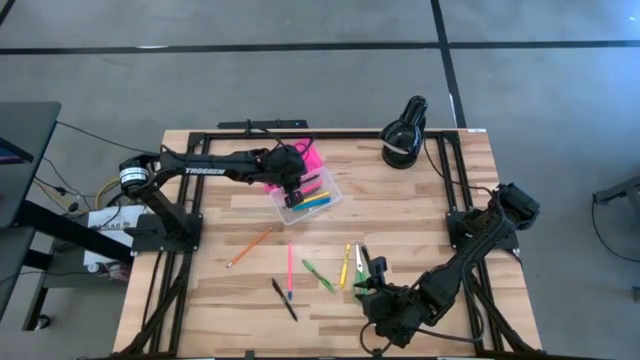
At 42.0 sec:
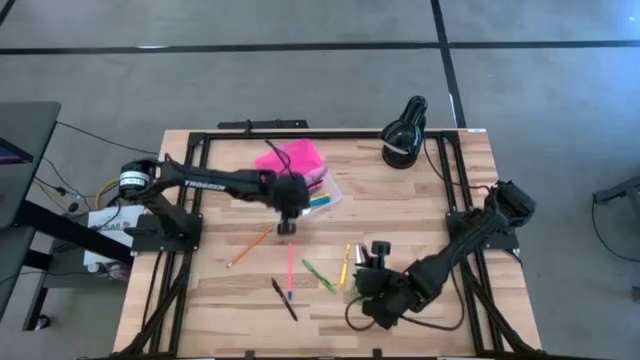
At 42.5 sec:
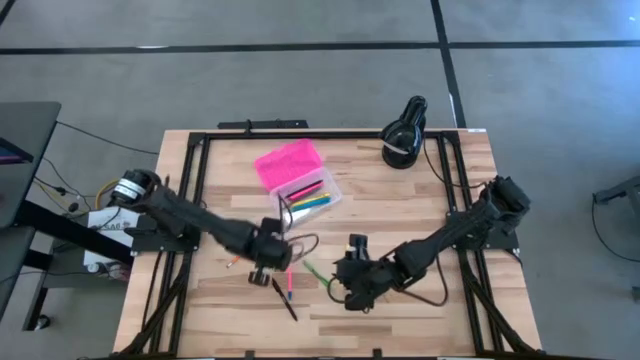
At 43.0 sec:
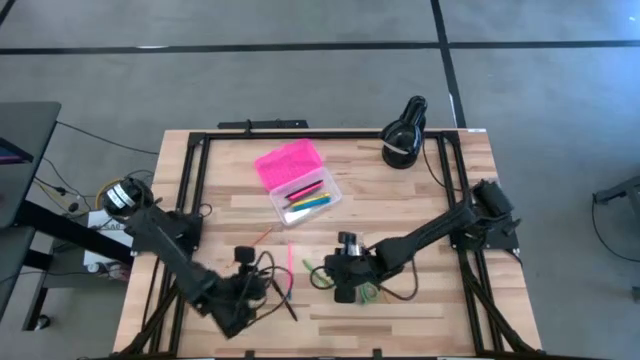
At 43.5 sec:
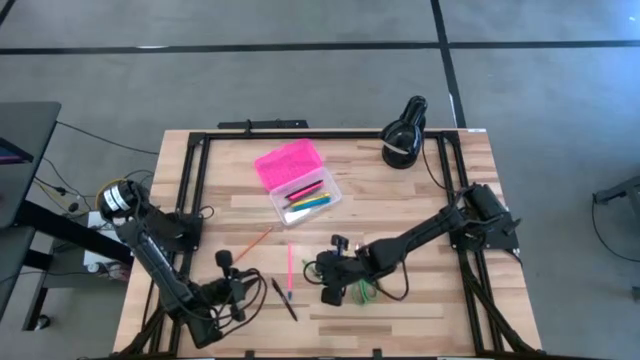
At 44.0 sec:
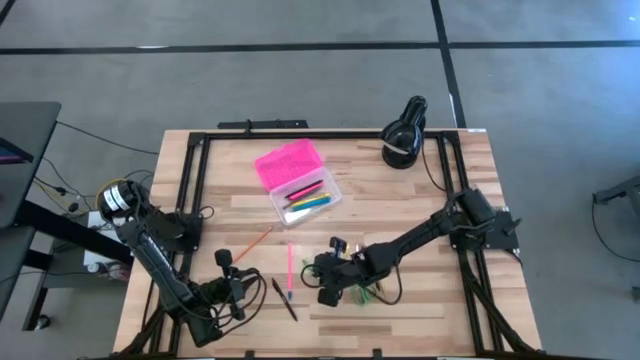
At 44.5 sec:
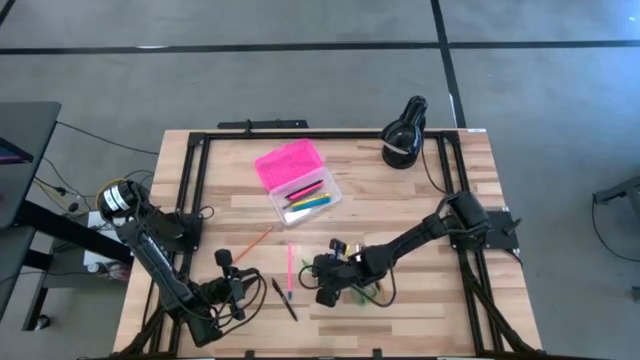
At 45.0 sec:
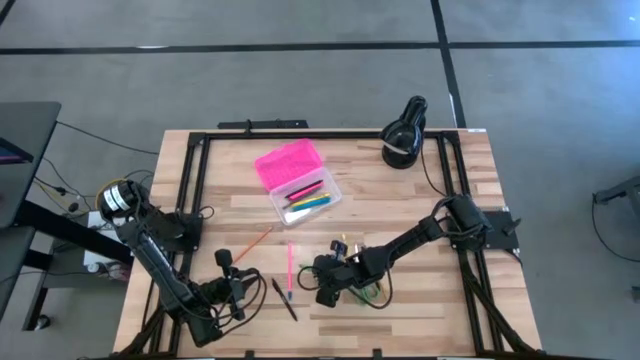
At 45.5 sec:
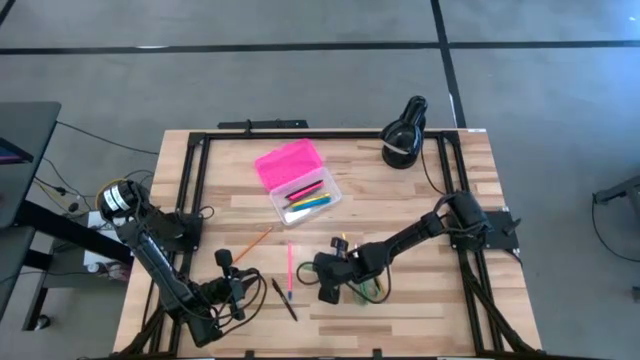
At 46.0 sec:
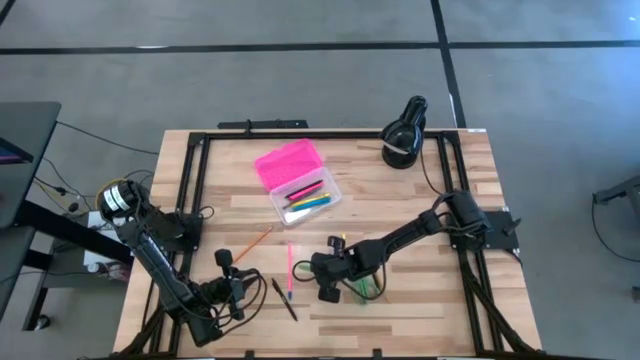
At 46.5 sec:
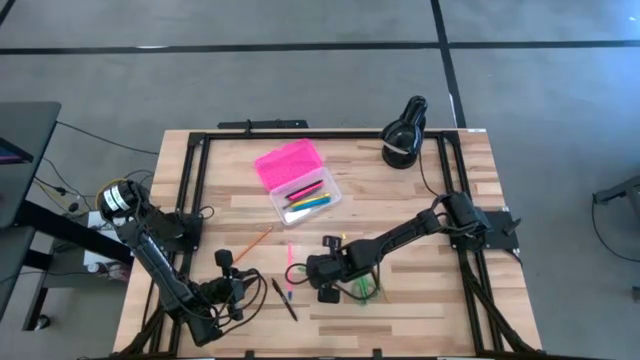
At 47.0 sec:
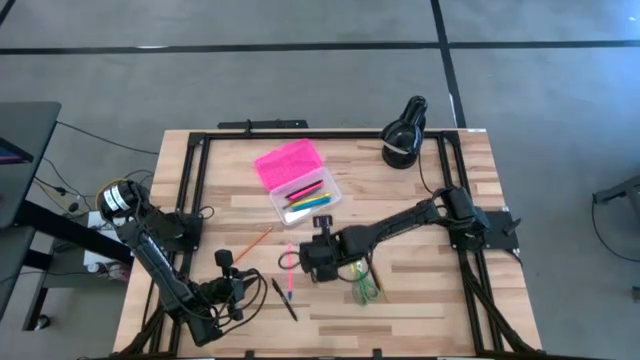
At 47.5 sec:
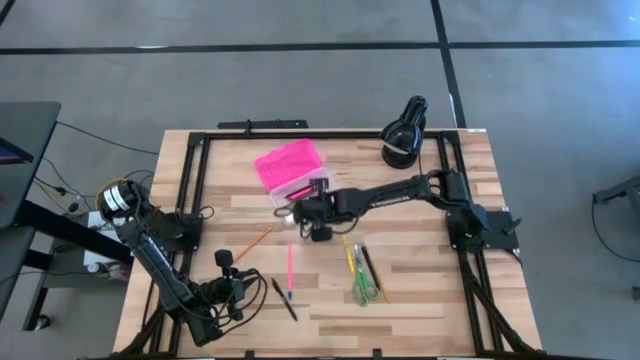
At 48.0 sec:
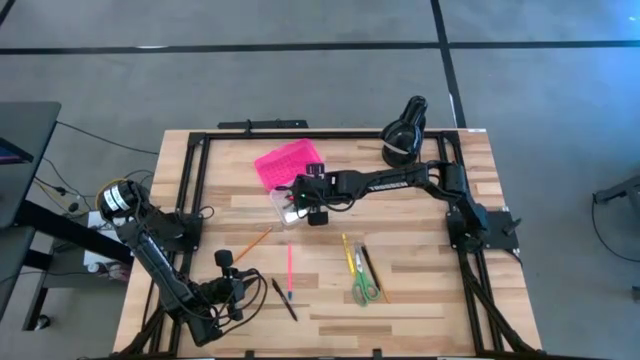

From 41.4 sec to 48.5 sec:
Task: Pick & place school supplies into a supply box
Put the green pen into the black supply box

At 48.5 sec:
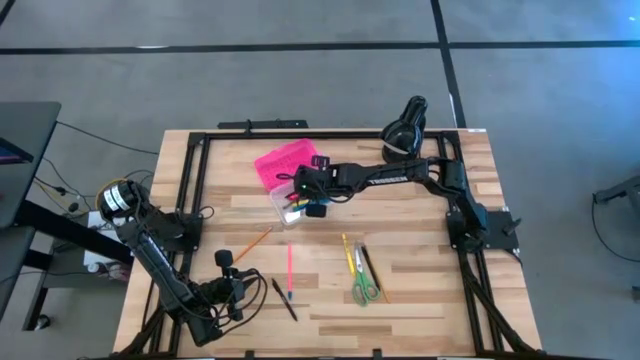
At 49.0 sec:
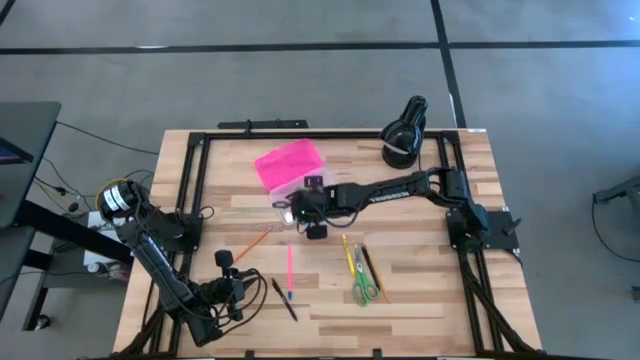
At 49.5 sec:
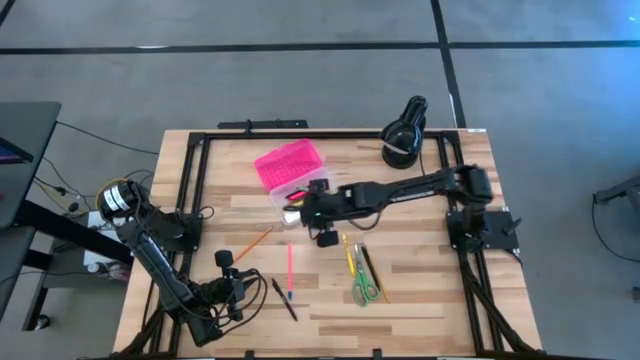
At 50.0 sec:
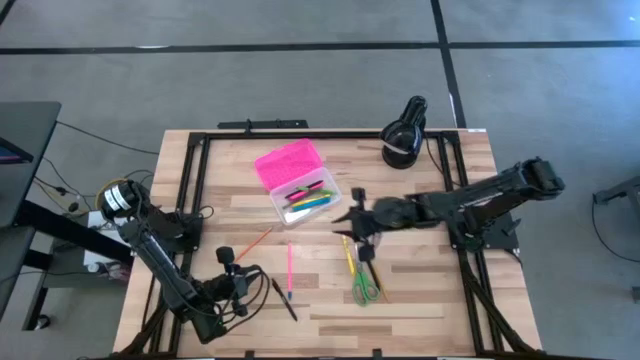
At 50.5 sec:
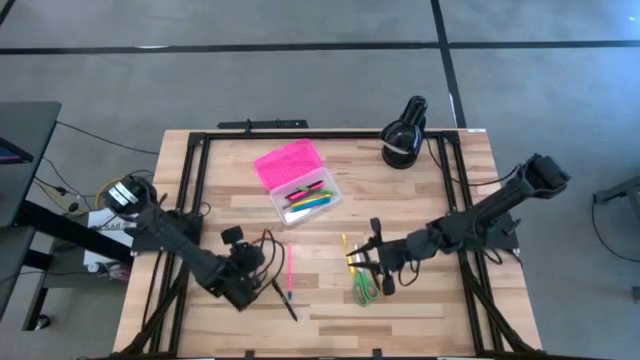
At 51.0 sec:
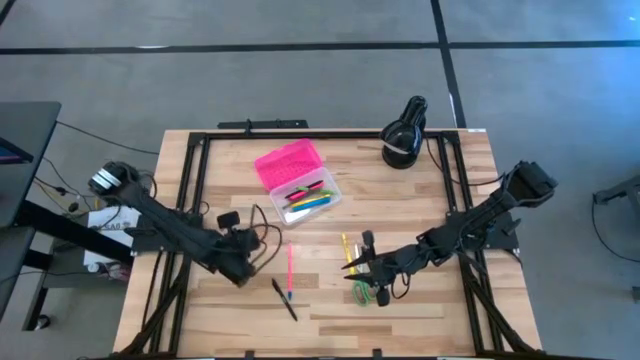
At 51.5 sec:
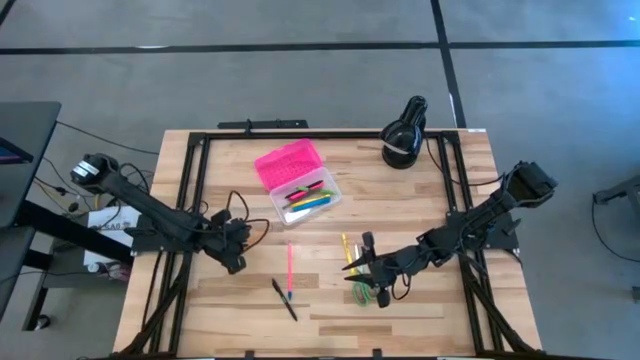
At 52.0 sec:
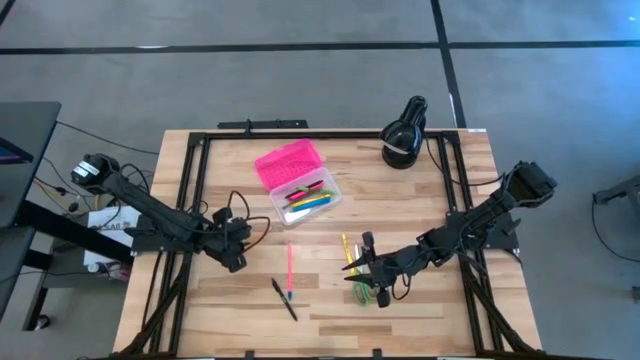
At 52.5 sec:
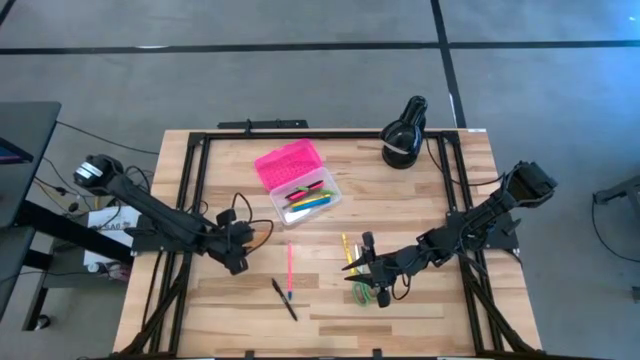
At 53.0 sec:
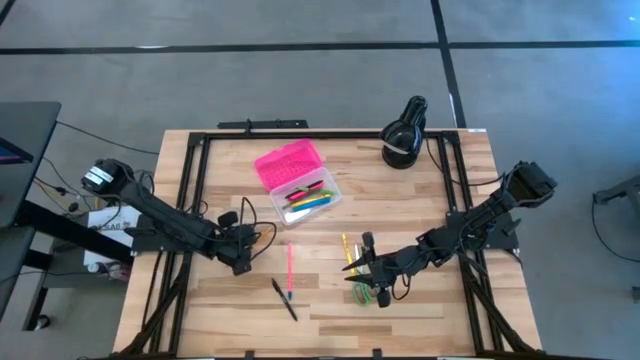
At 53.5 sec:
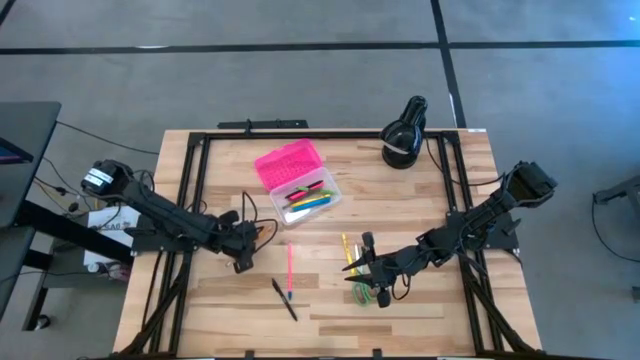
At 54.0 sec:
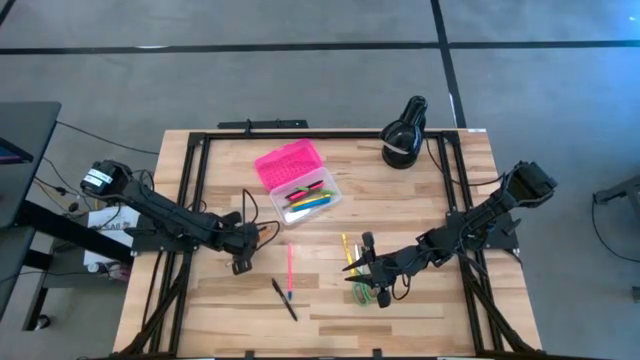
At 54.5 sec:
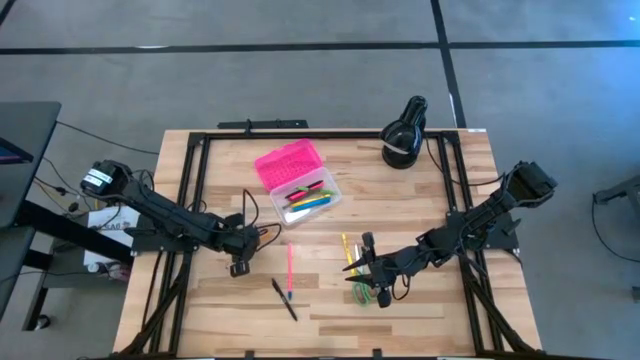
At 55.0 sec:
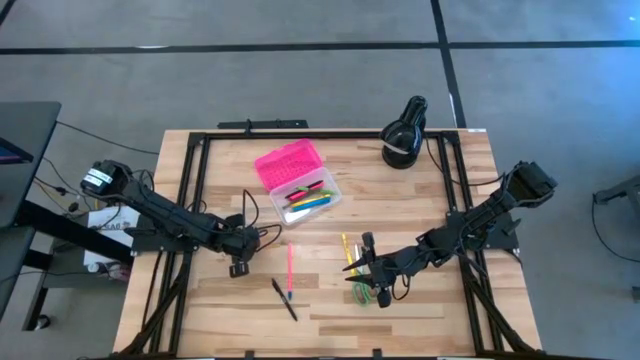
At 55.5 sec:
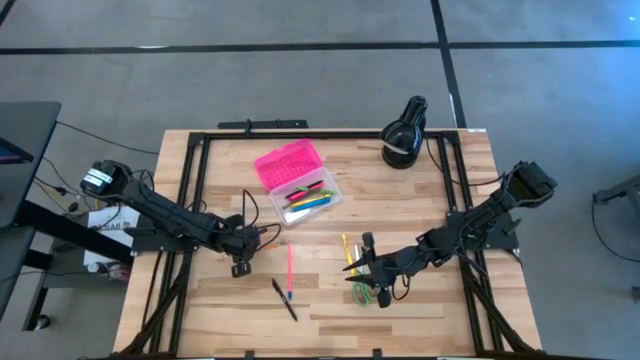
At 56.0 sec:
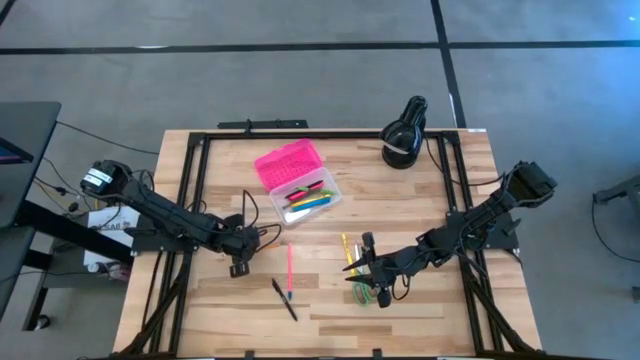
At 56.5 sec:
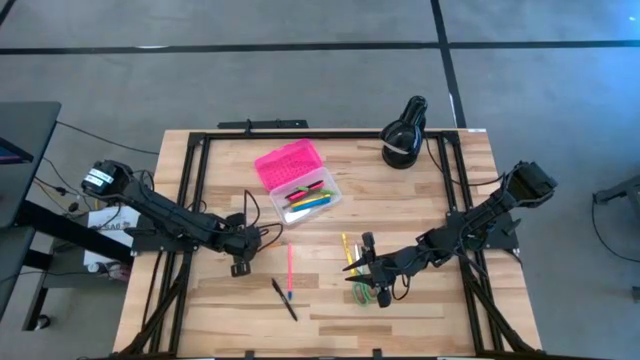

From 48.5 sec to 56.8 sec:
Put the orange pencil into the black supply box

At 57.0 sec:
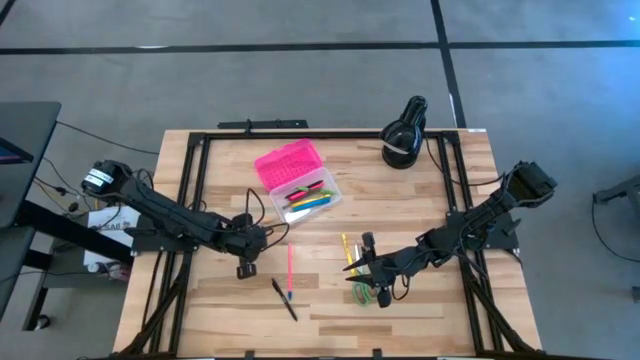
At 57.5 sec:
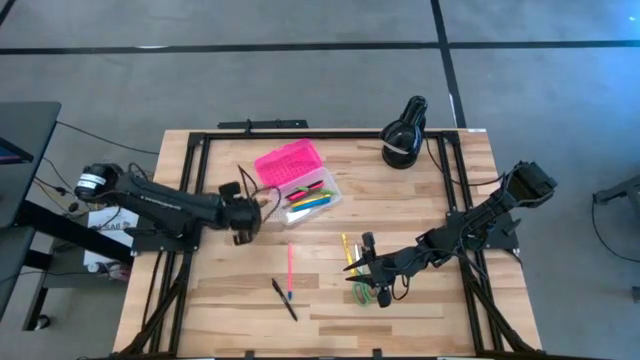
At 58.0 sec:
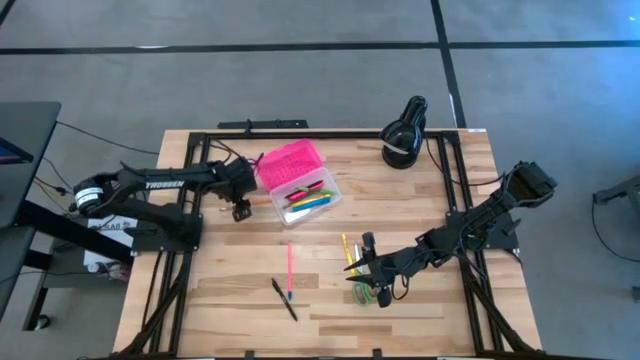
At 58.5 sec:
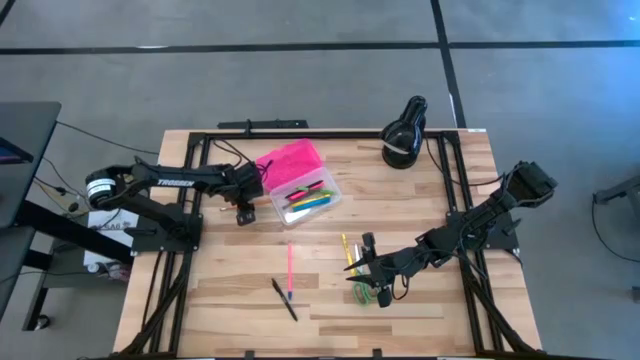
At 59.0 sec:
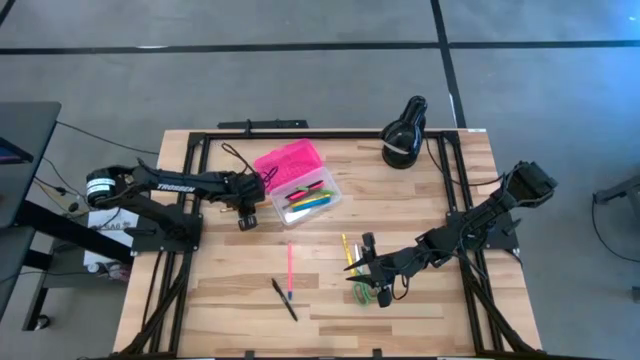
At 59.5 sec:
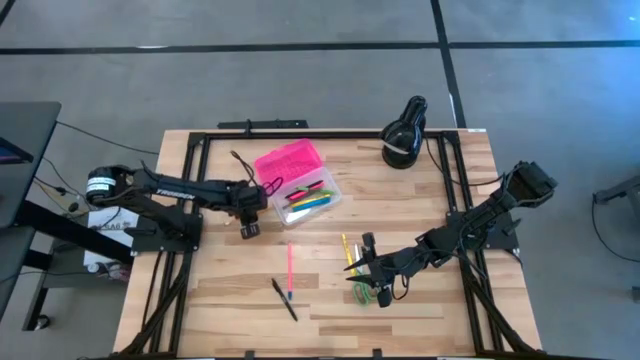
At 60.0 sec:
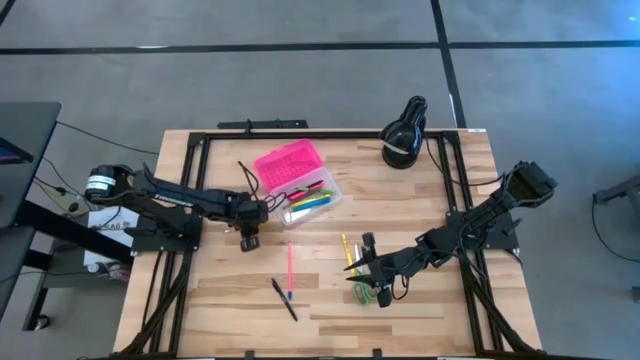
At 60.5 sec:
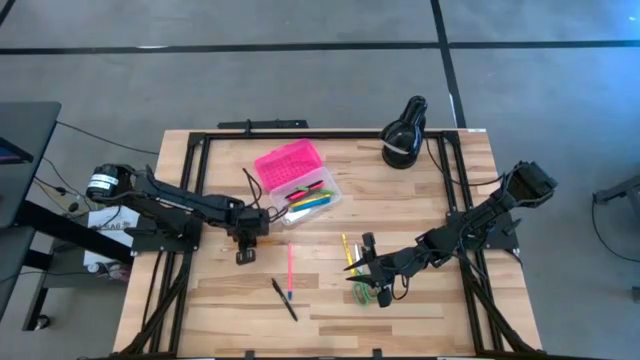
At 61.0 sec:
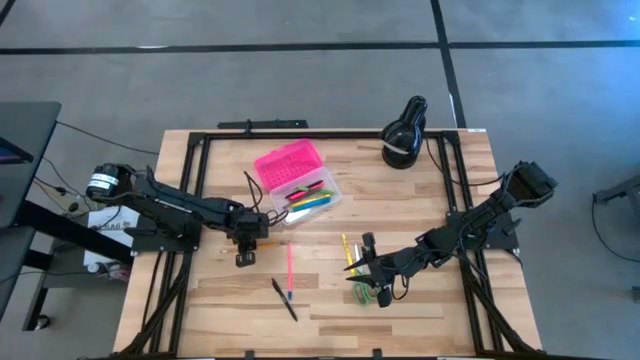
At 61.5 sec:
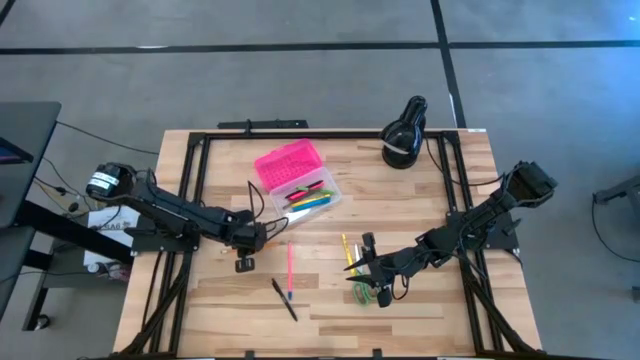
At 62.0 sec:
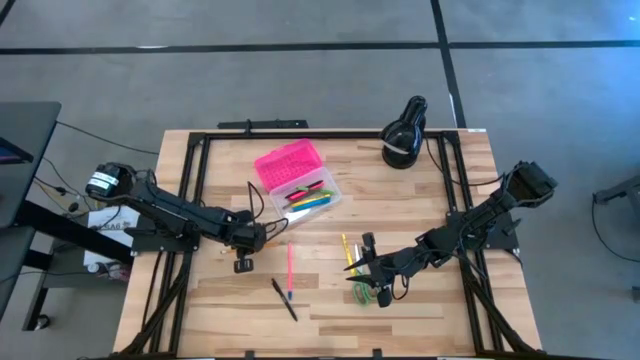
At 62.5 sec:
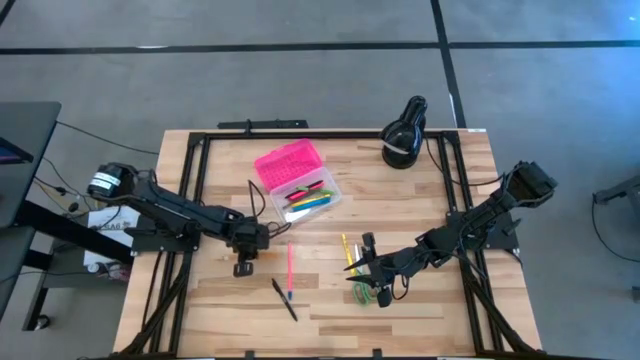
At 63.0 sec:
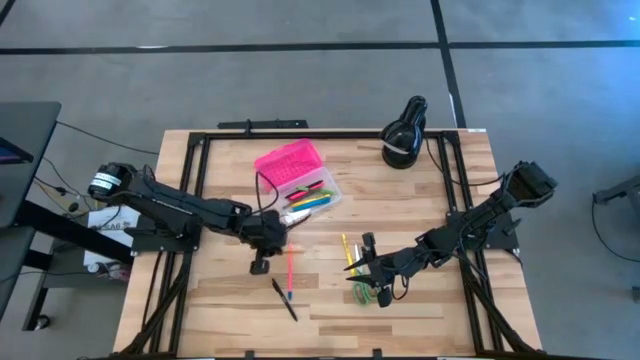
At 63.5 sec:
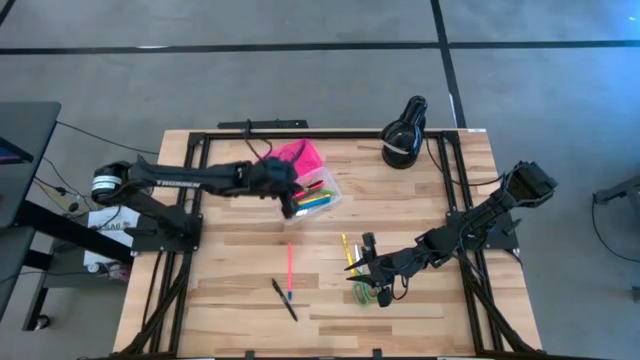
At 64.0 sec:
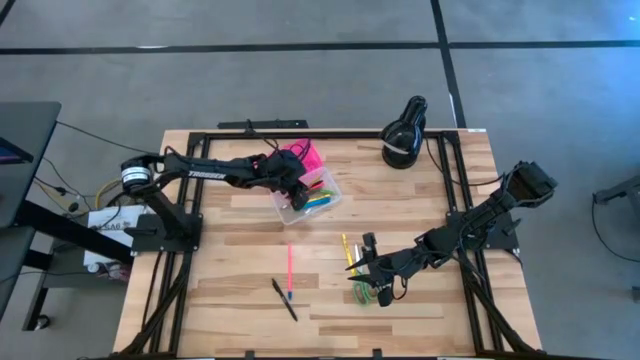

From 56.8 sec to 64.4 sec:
Put the orange pencil into the black supply box
